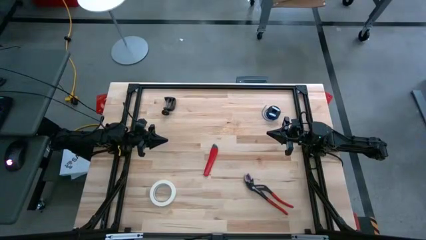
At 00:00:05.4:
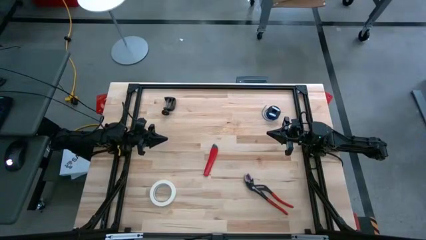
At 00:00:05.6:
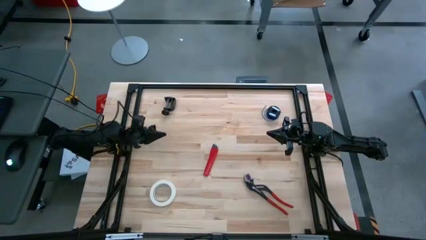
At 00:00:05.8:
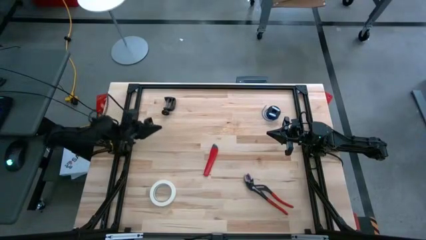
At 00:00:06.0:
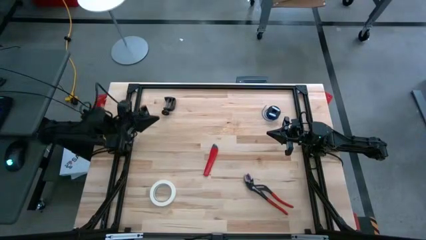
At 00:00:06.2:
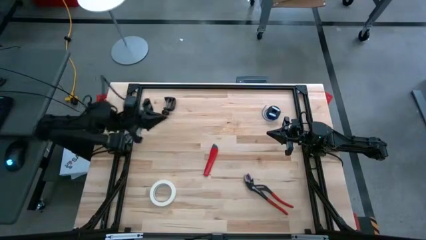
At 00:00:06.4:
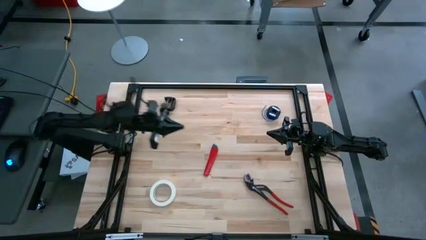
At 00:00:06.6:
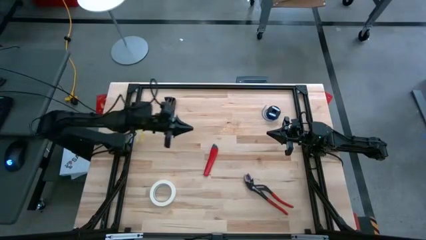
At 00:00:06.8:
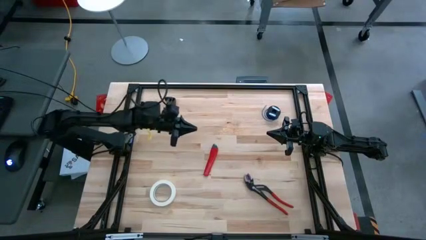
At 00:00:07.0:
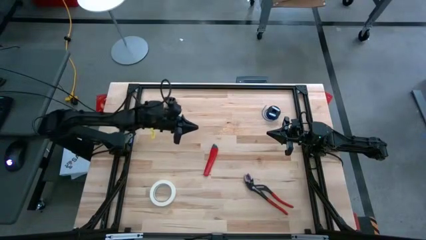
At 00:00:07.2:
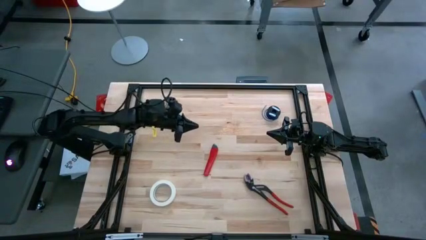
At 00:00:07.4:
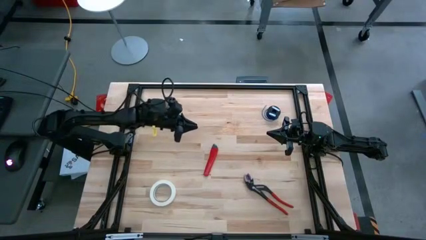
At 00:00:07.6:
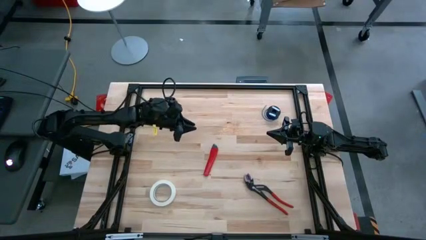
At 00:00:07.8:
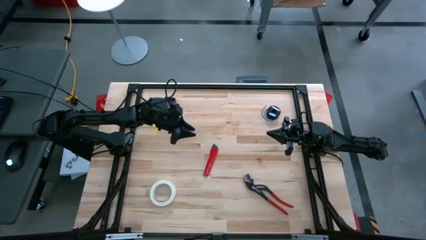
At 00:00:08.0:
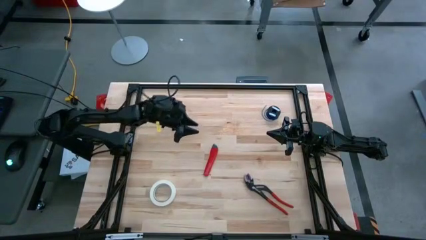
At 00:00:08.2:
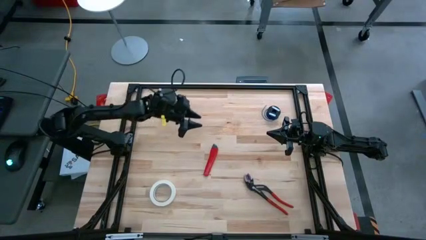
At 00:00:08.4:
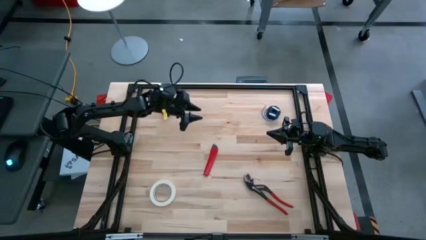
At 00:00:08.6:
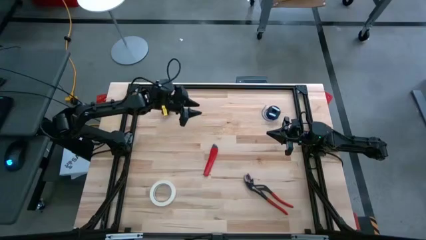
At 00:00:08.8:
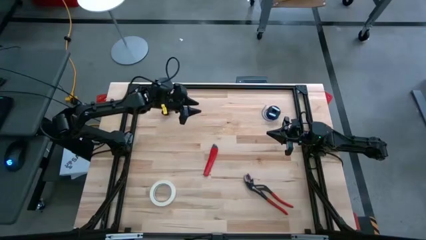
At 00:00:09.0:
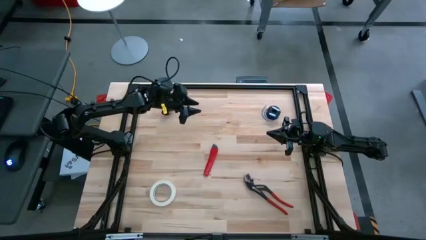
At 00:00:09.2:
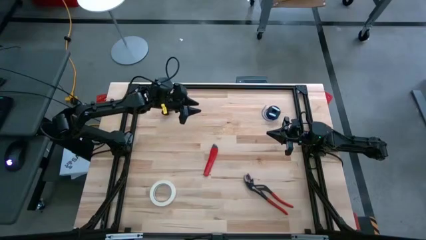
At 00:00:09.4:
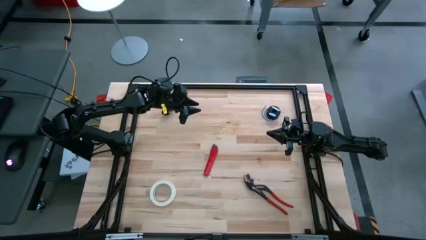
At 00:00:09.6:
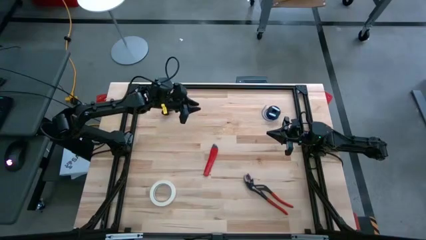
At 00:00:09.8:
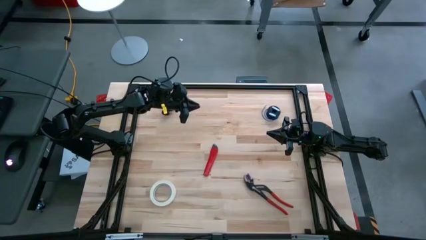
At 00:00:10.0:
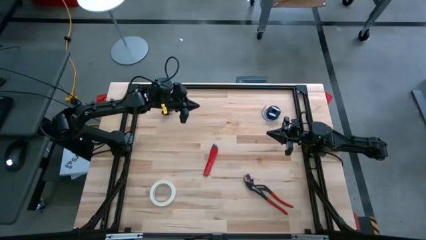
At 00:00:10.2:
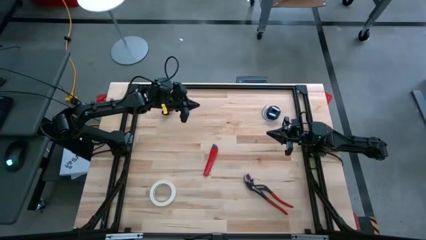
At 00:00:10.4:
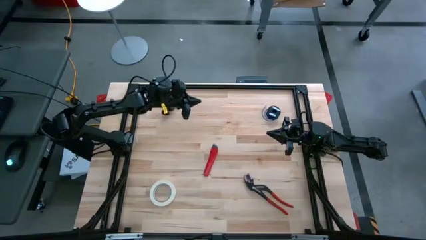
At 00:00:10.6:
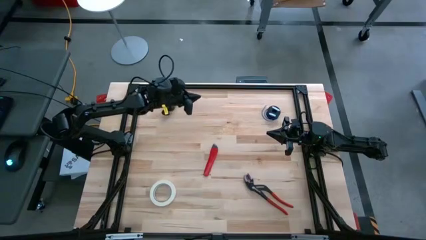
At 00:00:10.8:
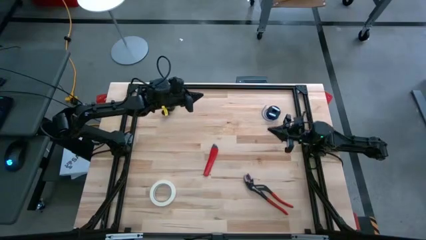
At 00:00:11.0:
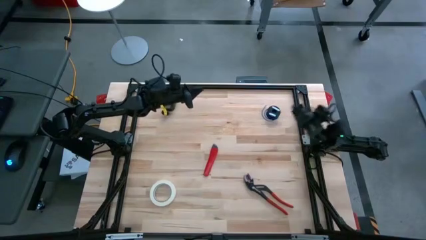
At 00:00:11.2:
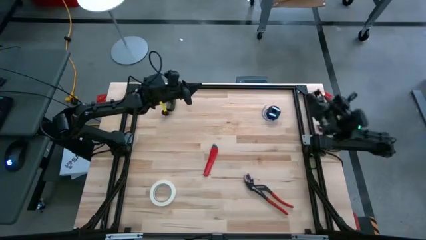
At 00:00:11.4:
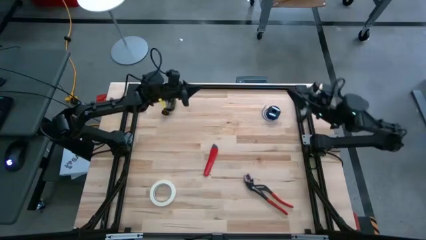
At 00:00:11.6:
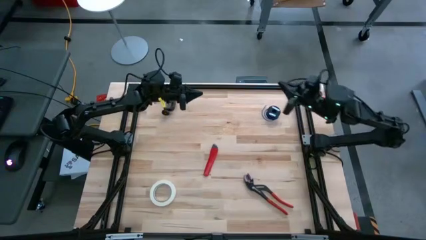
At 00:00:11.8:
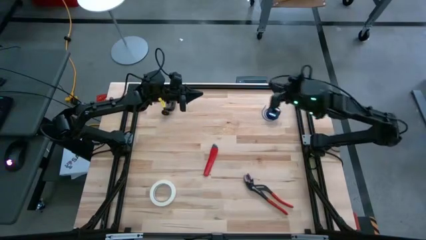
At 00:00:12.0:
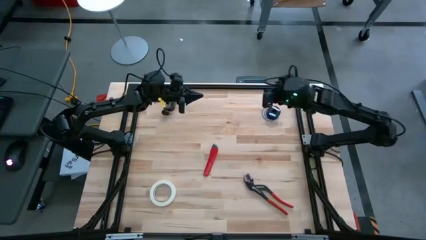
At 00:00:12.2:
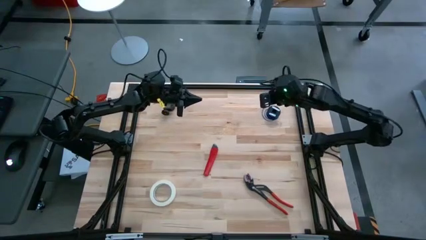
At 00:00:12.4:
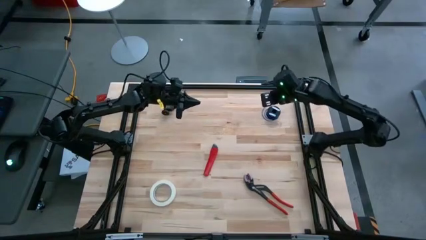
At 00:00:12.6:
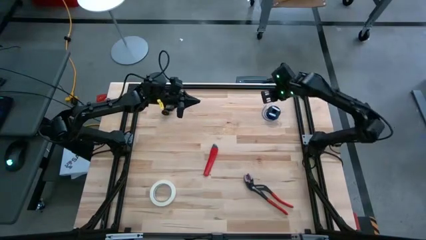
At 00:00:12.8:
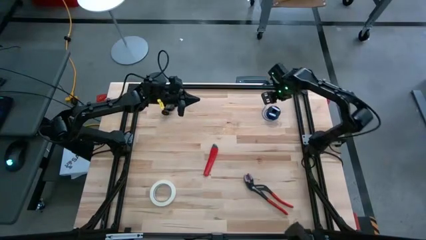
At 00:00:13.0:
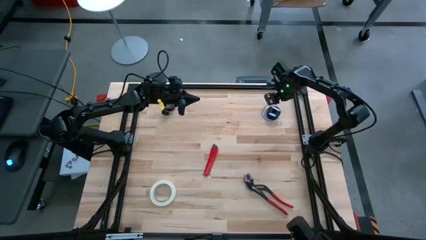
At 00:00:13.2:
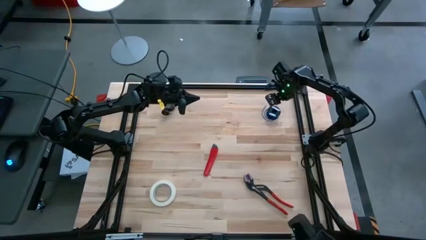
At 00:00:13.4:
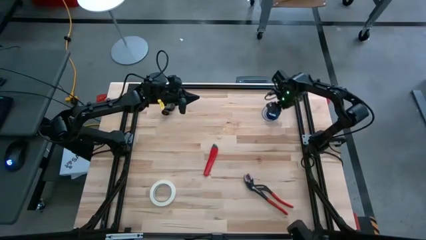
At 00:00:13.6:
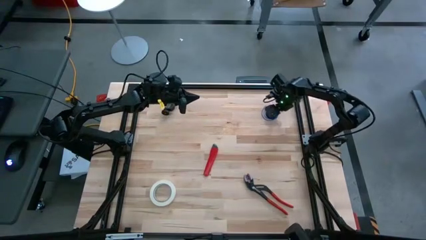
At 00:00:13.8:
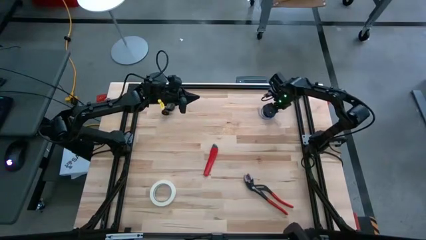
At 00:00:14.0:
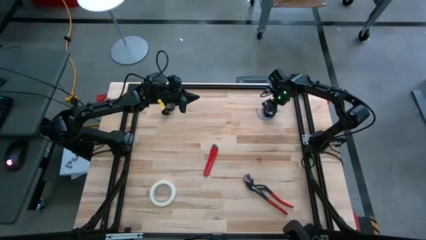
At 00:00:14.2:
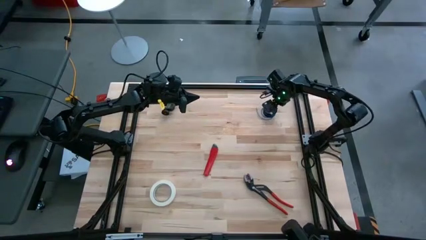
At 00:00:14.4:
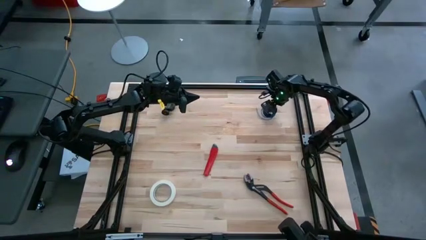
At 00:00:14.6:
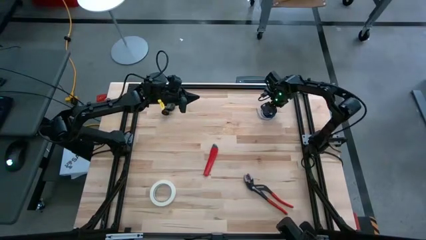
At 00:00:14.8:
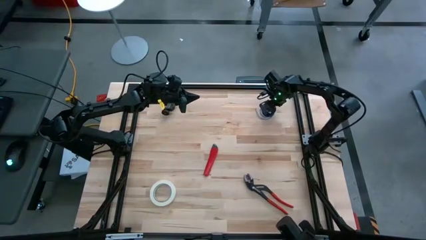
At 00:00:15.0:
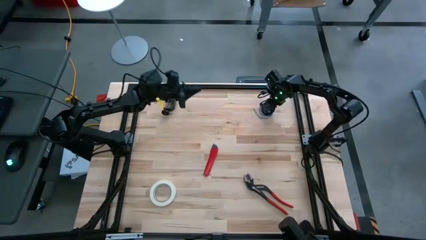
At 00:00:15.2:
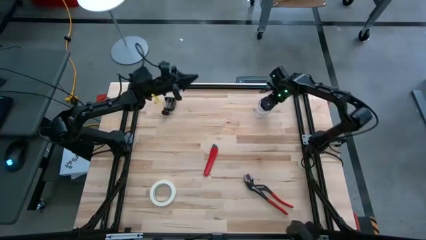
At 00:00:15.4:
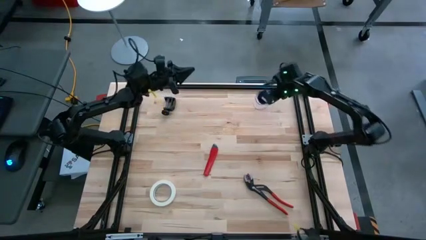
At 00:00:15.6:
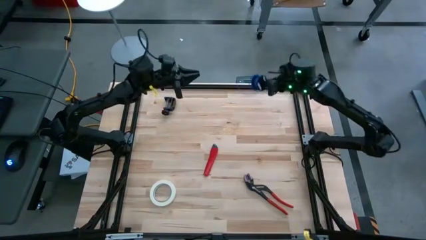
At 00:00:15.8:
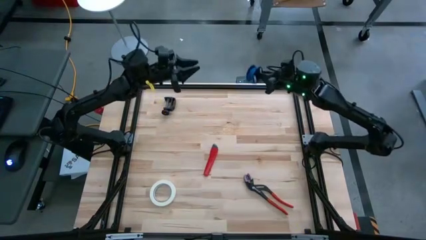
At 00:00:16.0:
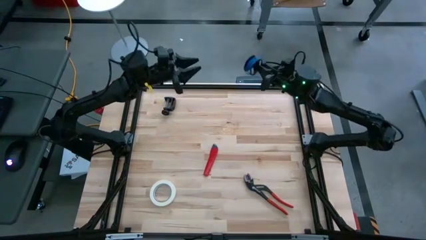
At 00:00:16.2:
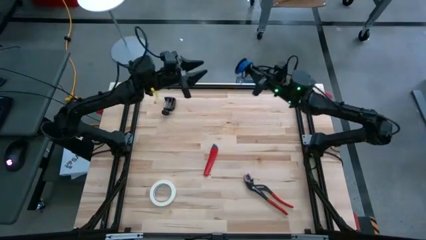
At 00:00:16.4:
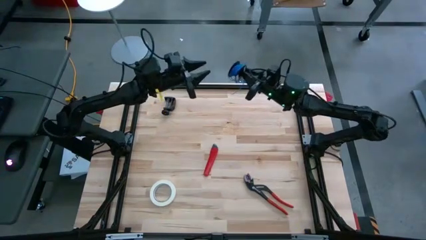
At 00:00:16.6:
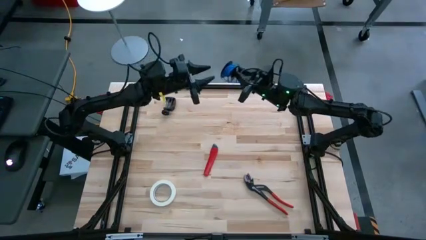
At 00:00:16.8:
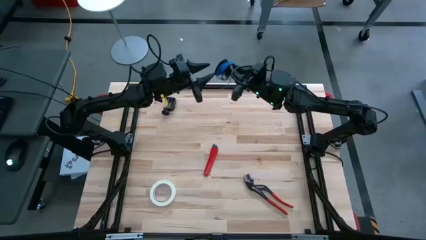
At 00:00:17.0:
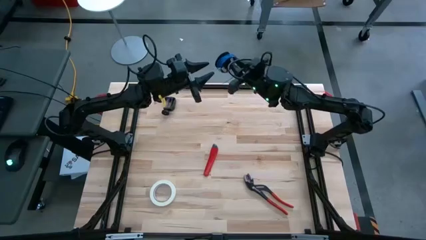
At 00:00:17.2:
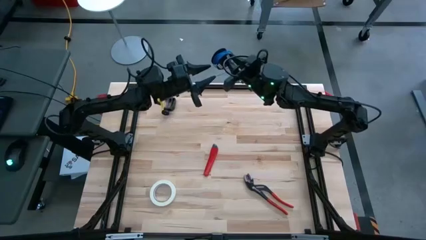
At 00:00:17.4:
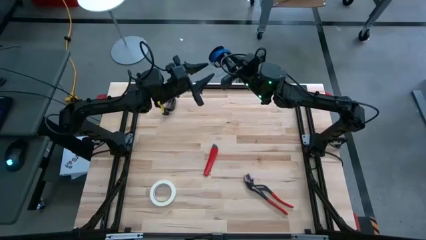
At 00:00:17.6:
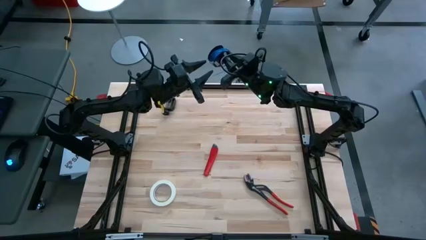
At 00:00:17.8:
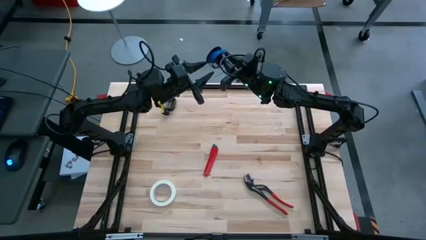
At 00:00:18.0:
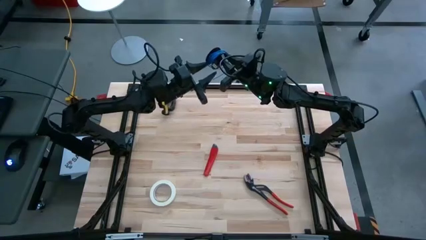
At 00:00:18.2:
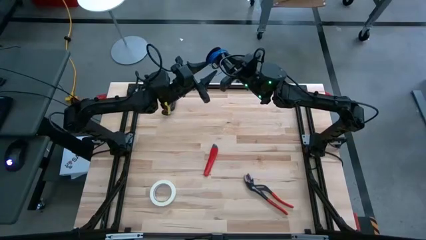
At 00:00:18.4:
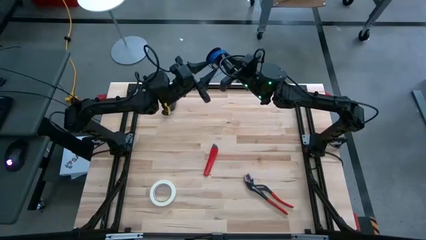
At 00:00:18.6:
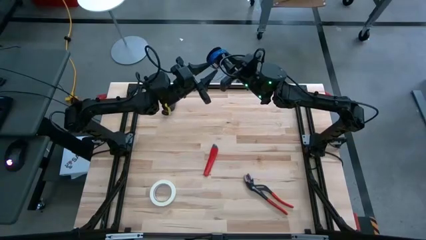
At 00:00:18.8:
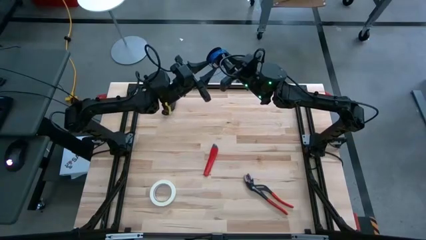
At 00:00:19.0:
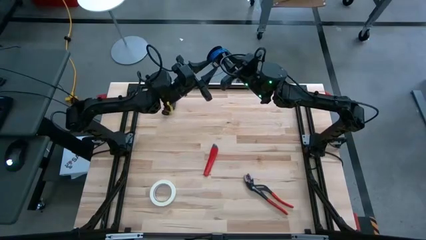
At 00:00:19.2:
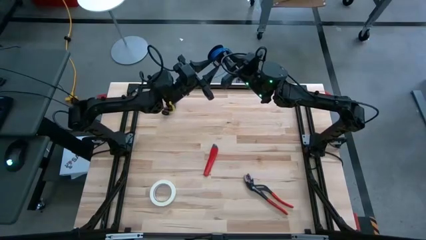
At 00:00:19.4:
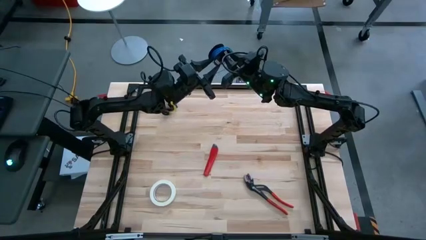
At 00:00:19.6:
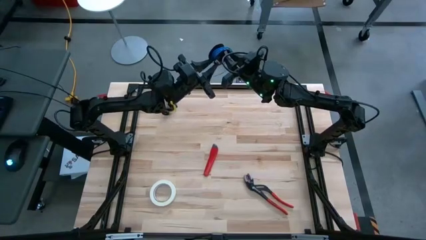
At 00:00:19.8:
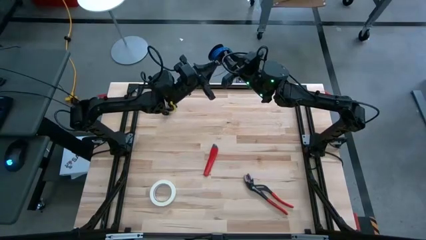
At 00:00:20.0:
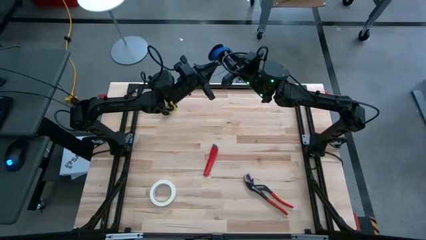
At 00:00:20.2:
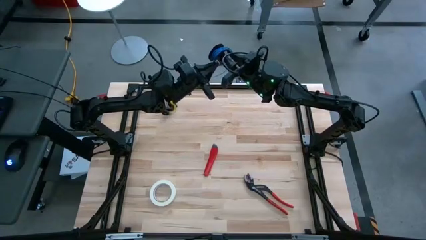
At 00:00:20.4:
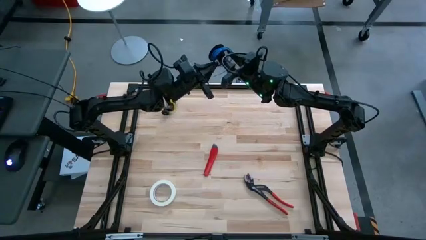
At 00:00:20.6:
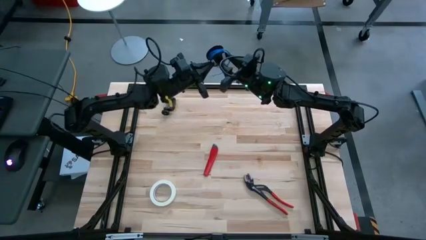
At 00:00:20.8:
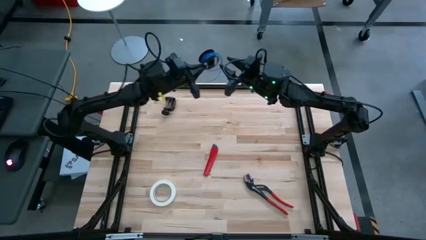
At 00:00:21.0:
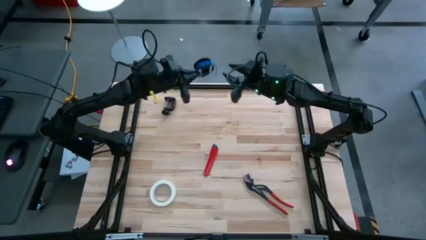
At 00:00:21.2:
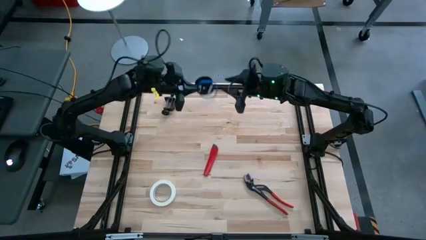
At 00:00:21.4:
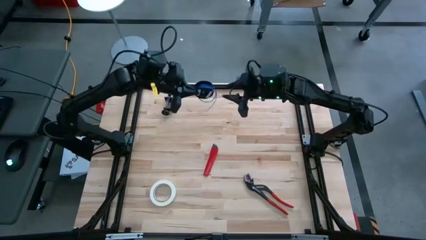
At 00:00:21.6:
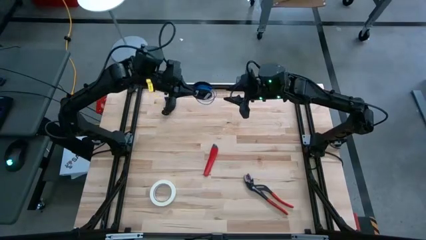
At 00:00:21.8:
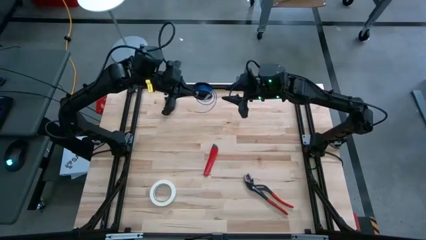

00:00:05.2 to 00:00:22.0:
Task: Coil cords
Uncoil the blue wire cable from the black spool
